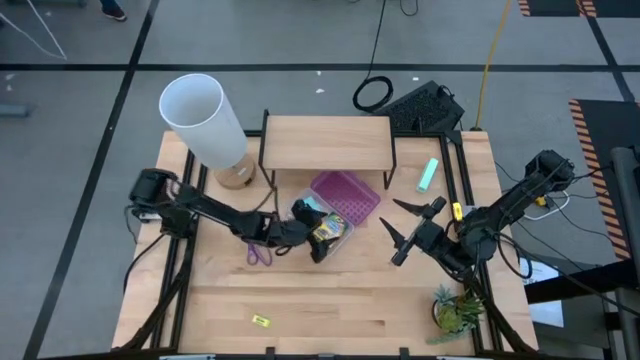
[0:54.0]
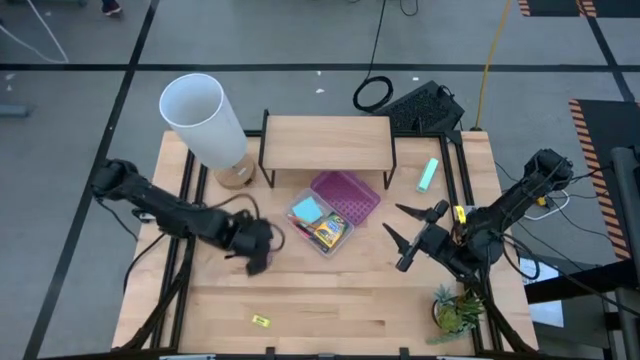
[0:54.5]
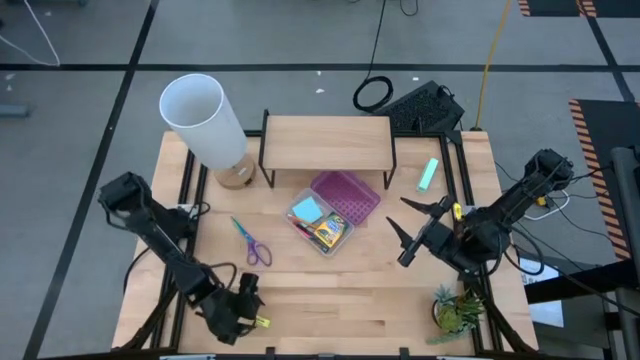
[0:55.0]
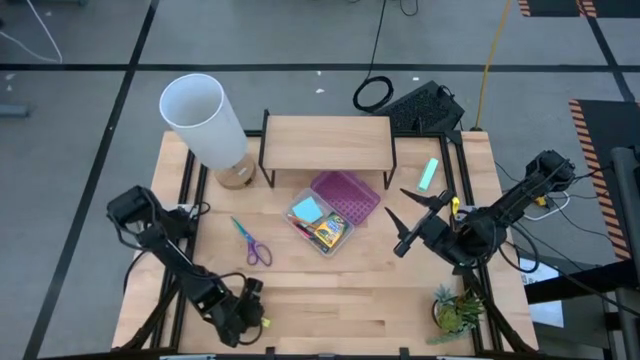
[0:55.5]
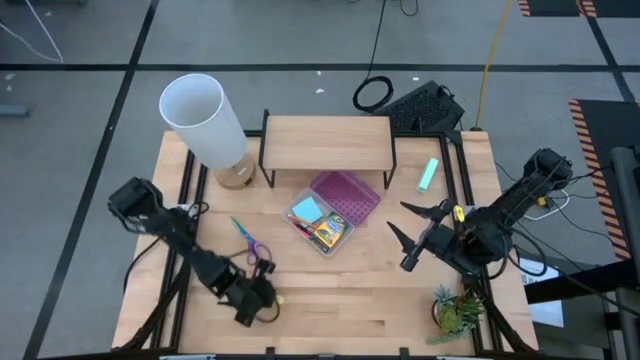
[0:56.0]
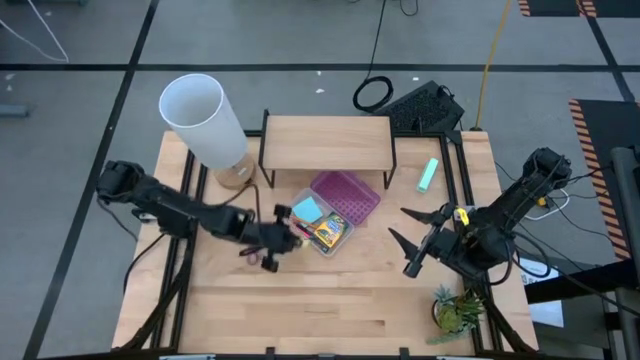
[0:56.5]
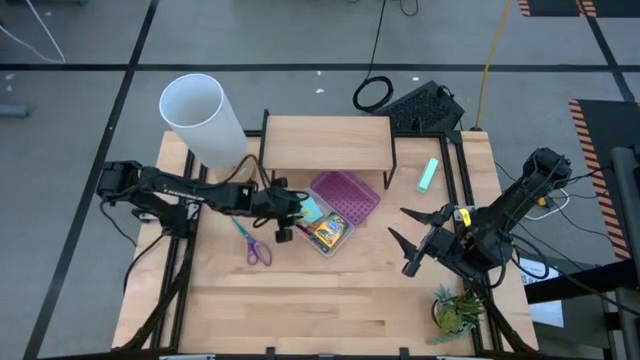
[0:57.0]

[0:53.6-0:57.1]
Task: Pack school essentials
Put the eraser into the supply box

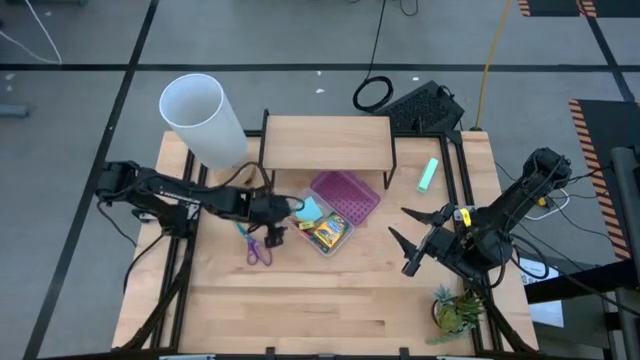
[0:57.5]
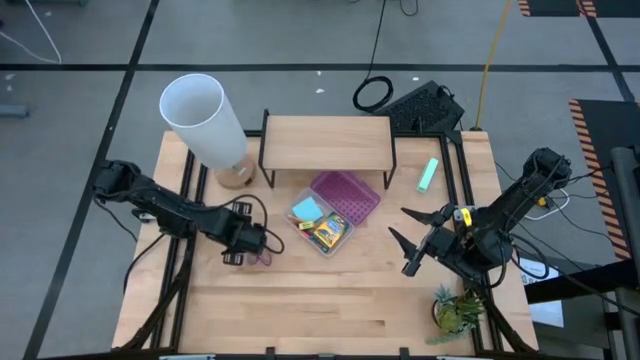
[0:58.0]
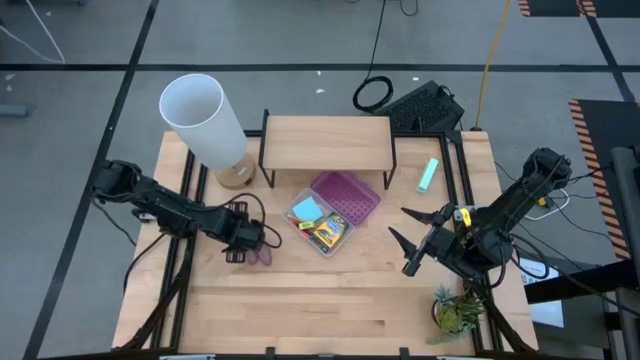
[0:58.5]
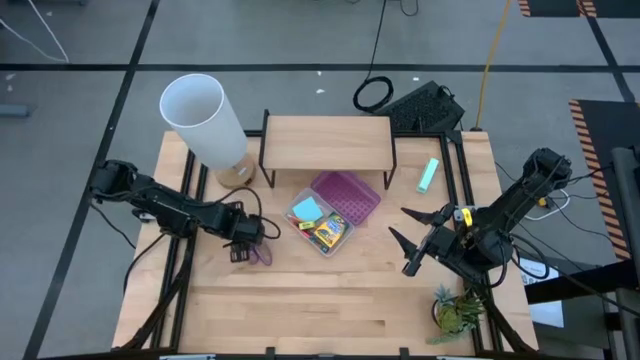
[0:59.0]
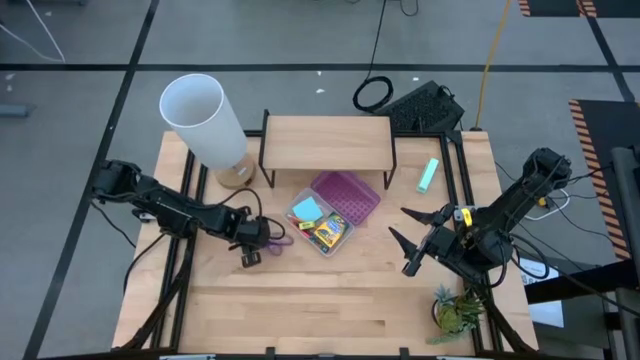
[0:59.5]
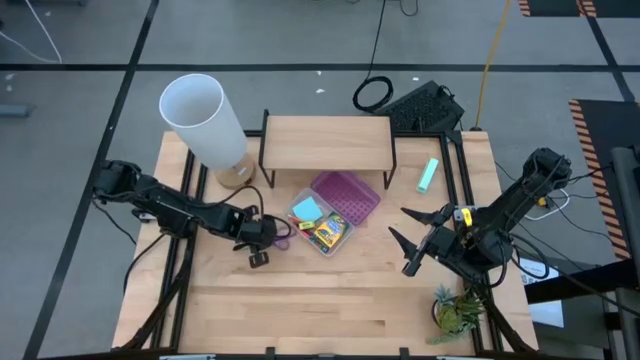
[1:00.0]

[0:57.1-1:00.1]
Put the scissors into the supply box

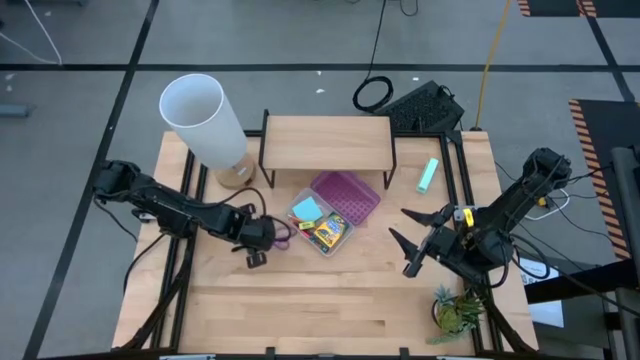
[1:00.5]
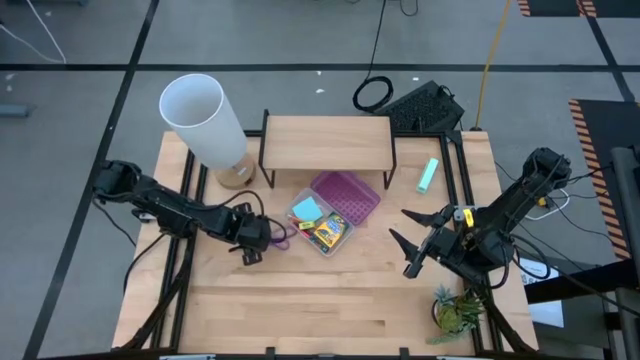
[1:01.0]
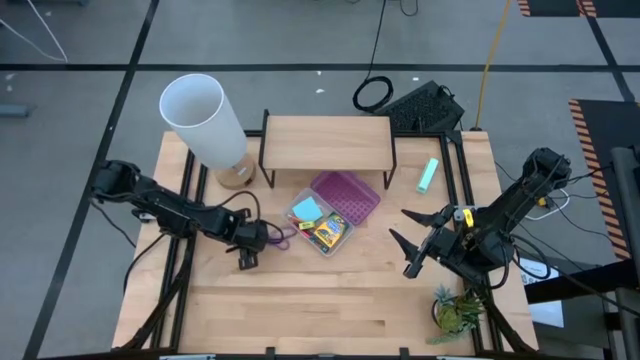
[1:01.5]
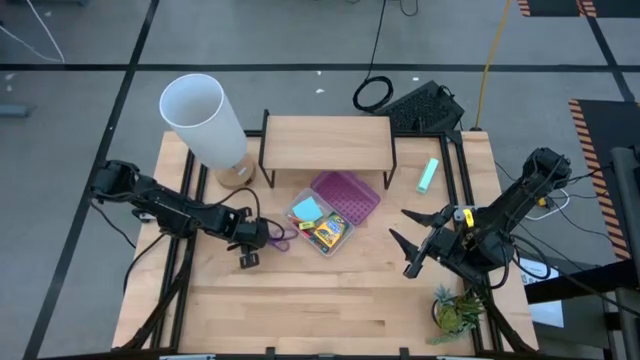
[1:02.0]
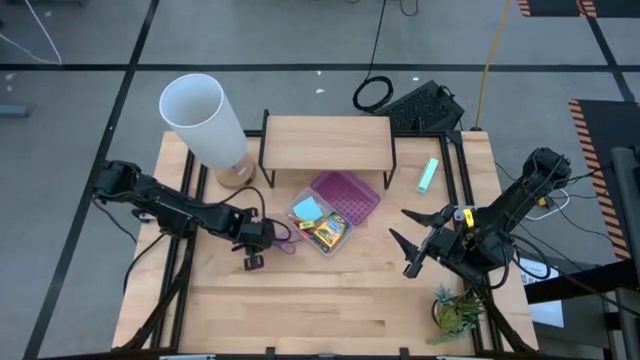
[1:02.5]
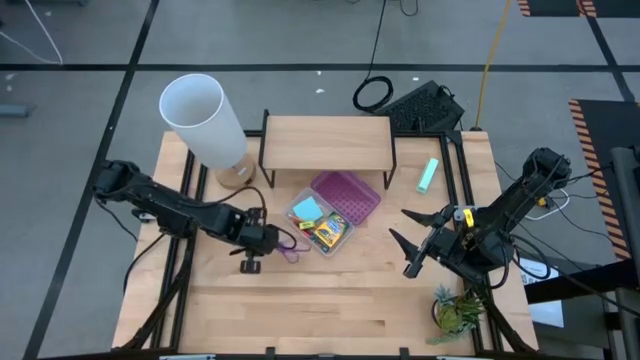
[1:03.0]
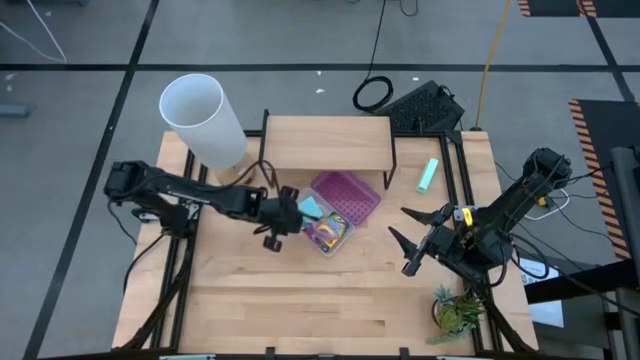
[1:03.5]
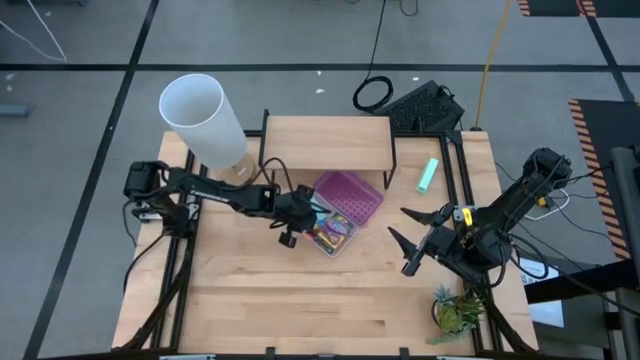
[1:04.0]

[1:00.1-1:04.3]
Put the scissors into the supply box

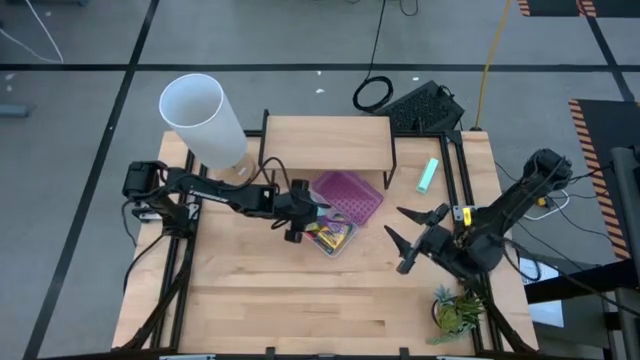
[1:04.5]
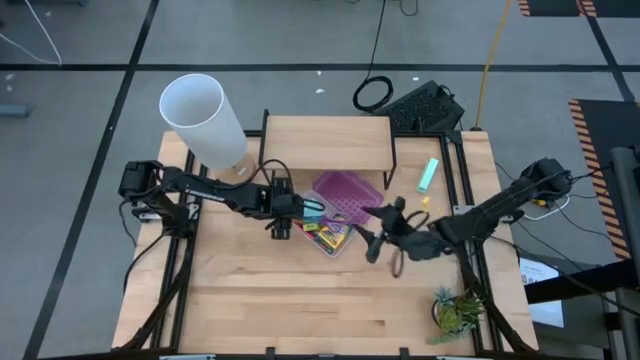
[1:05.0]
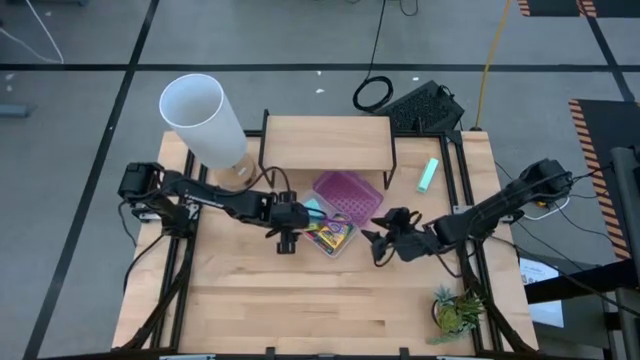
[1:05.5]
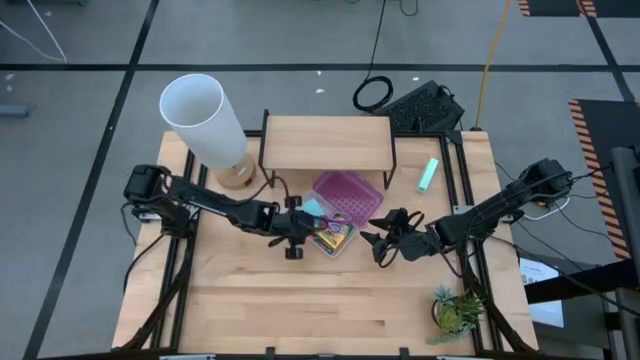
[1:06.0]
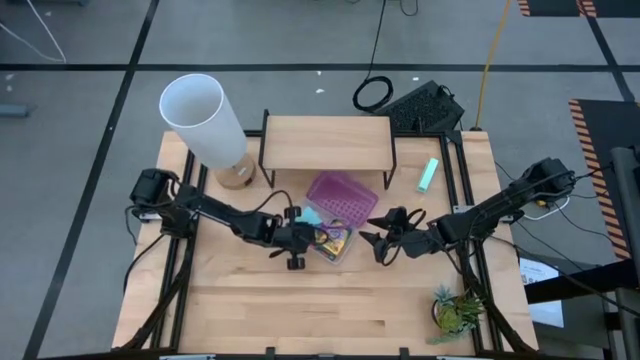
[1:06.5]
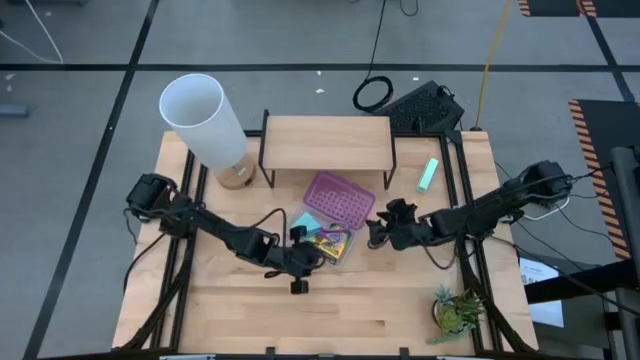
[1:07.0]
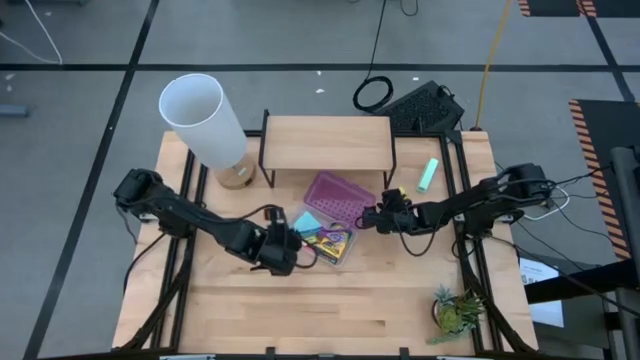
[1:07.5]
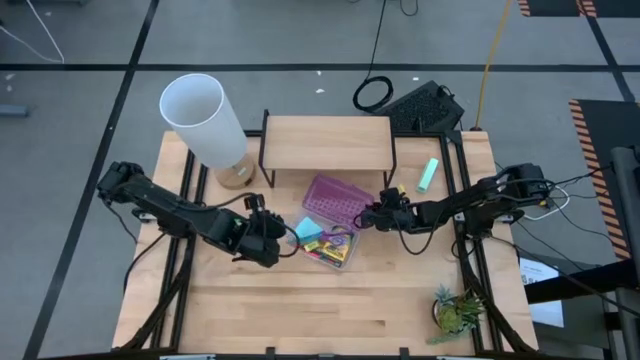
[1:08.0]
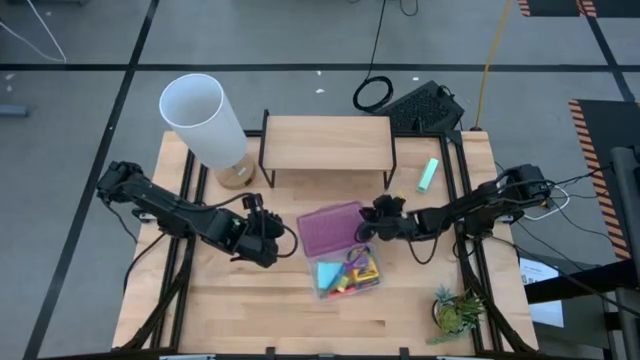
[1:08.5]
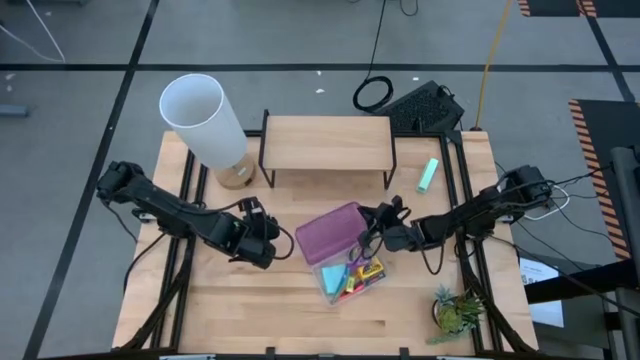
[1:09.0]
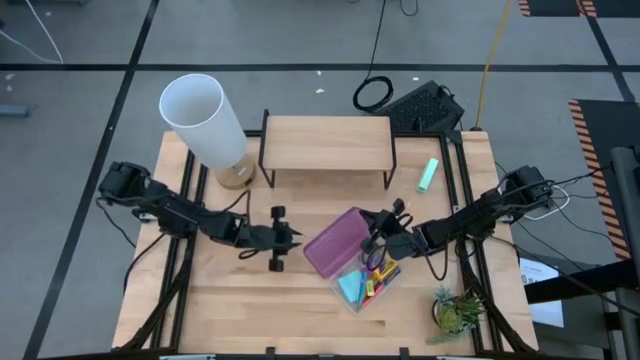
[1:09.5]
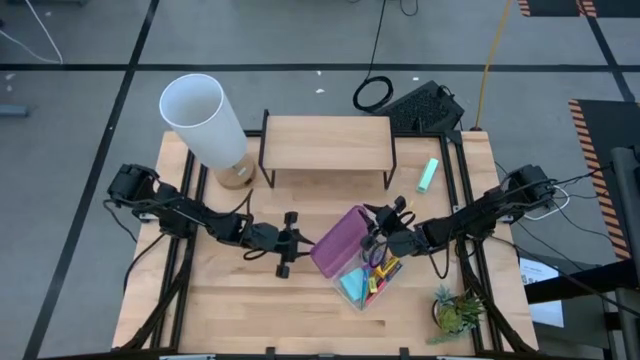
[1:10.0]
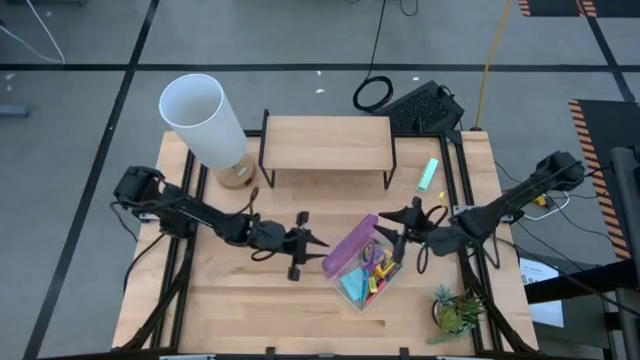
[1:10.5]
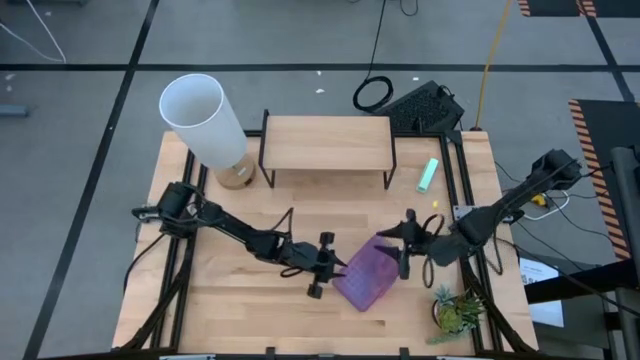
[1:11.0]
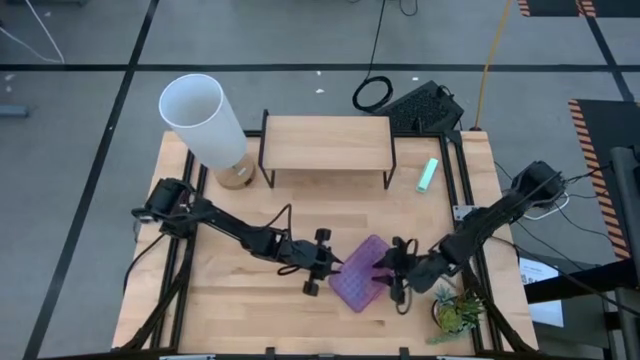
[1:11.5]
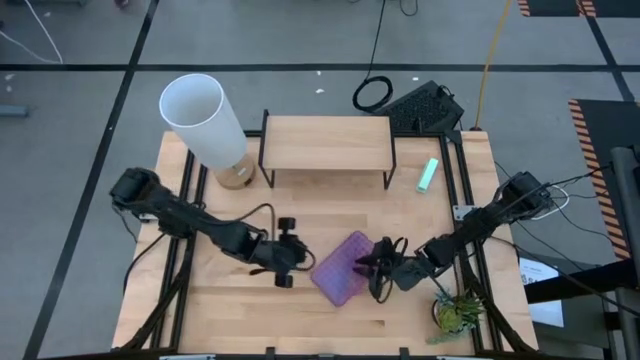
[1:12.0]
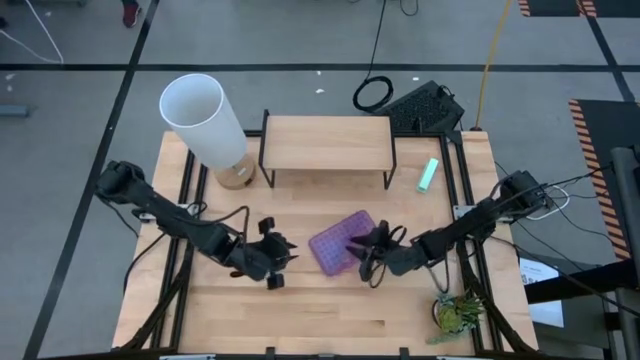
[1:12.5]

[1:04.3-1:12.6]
Close the supply box
